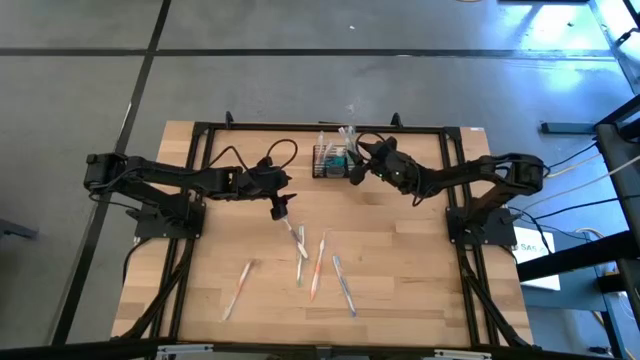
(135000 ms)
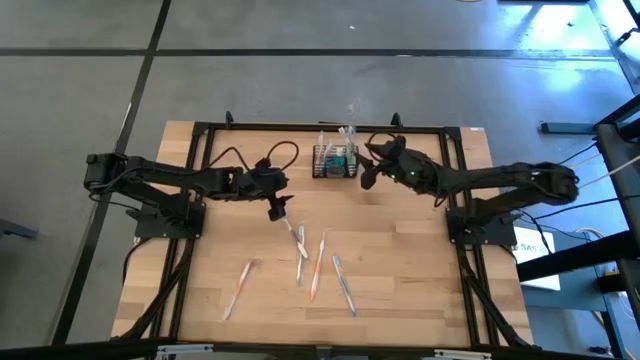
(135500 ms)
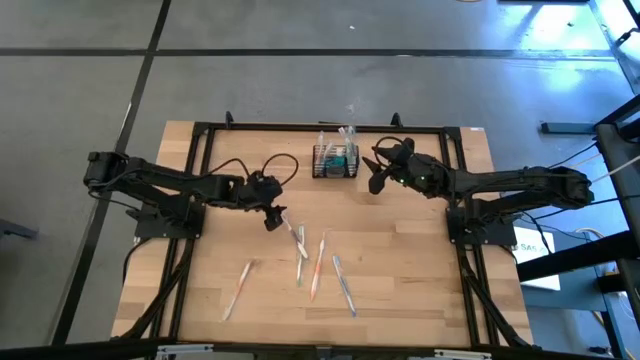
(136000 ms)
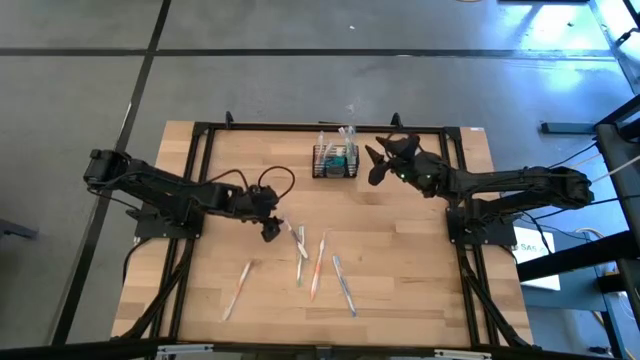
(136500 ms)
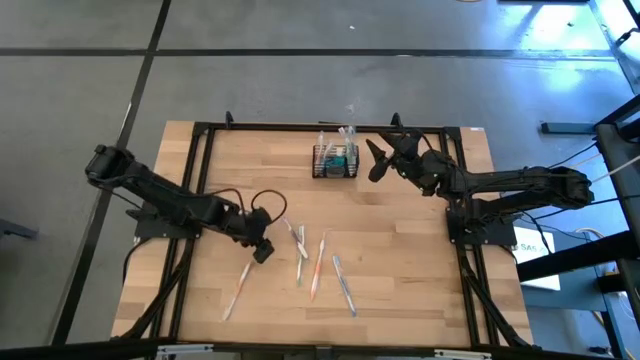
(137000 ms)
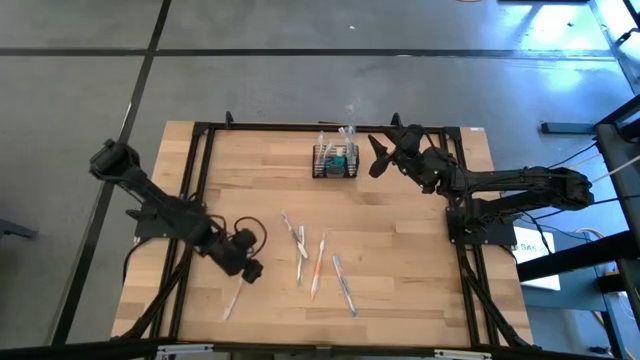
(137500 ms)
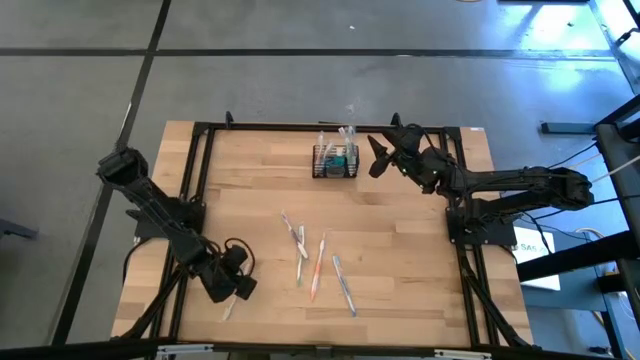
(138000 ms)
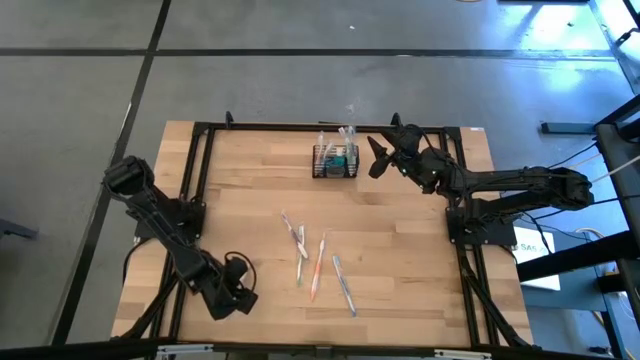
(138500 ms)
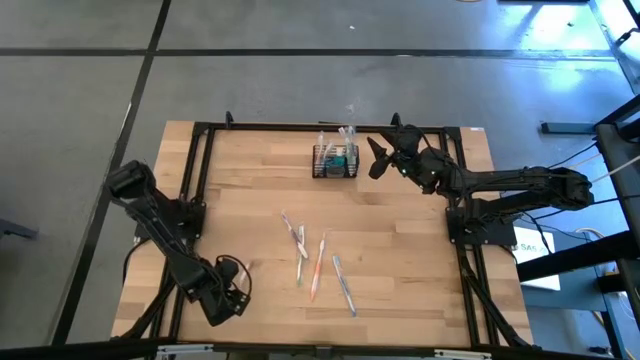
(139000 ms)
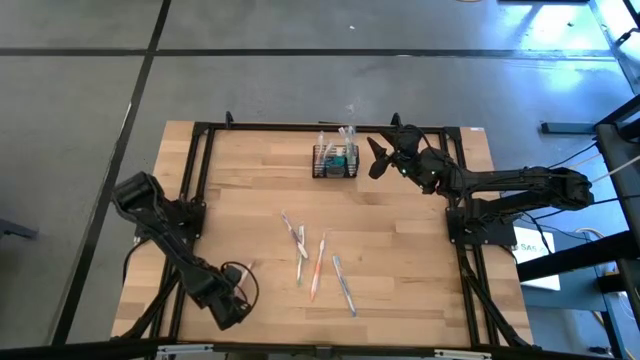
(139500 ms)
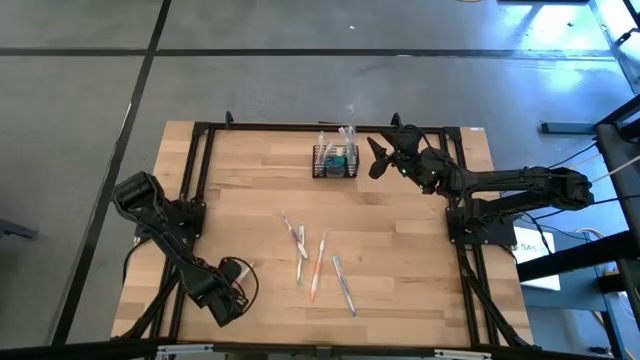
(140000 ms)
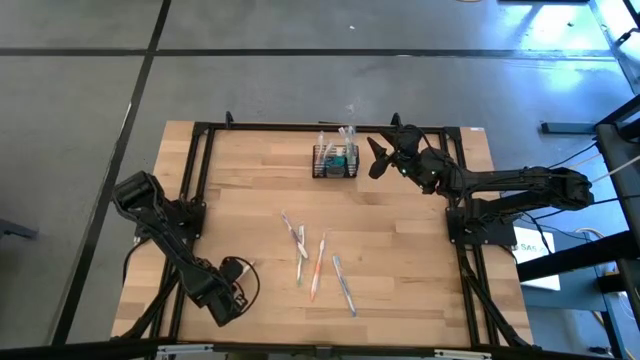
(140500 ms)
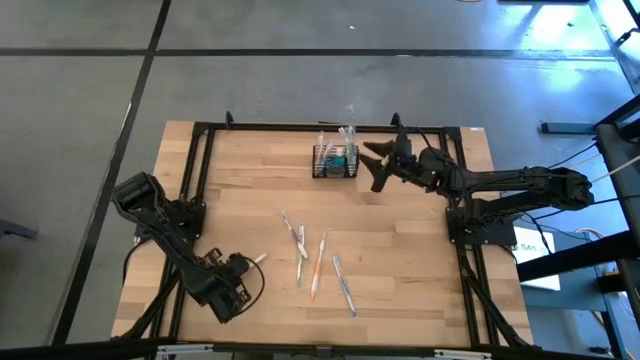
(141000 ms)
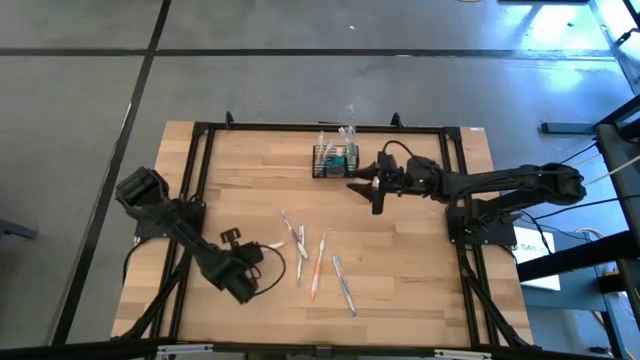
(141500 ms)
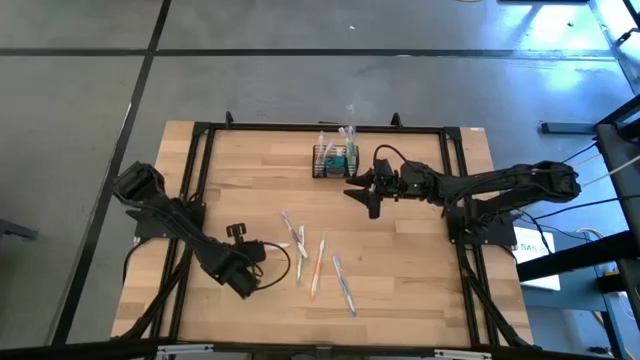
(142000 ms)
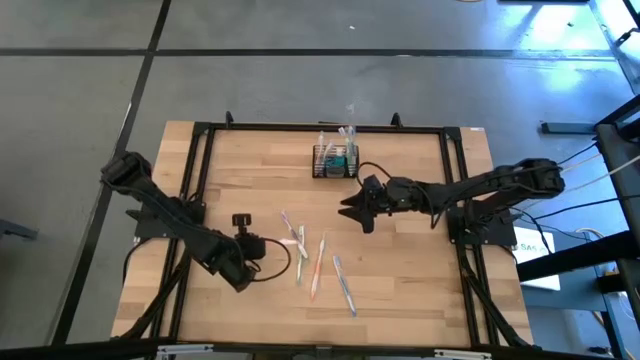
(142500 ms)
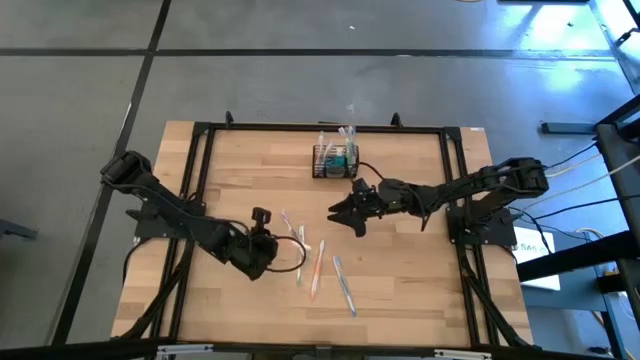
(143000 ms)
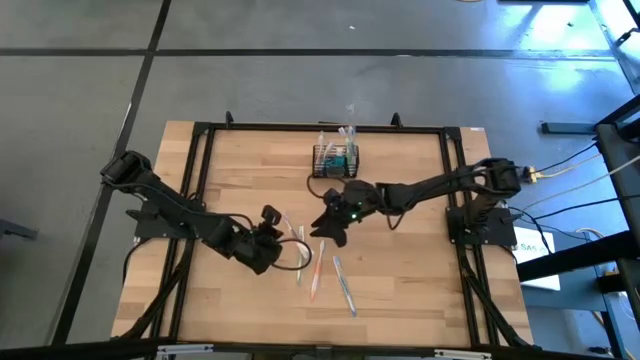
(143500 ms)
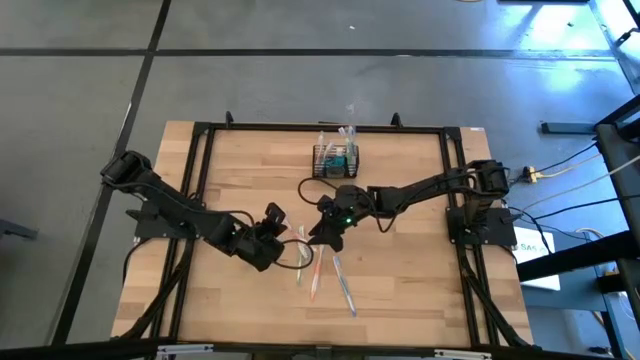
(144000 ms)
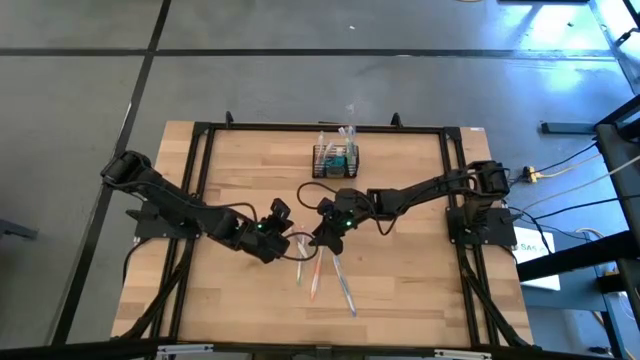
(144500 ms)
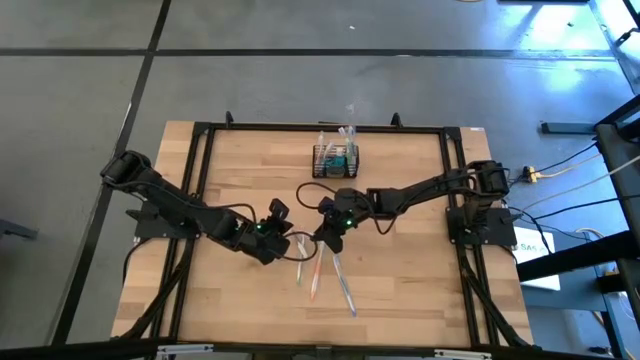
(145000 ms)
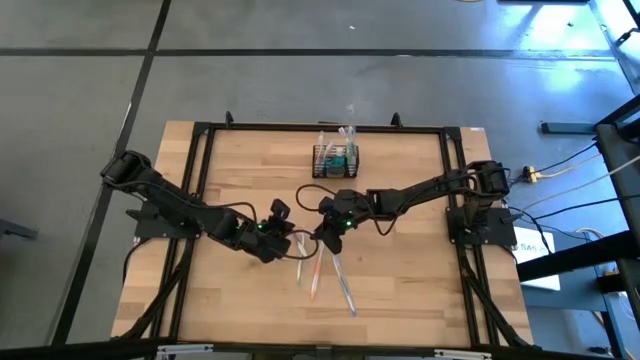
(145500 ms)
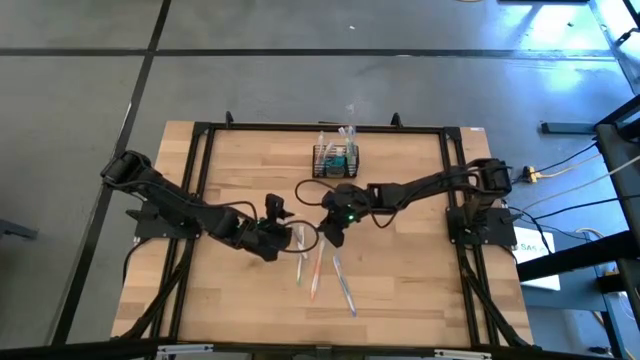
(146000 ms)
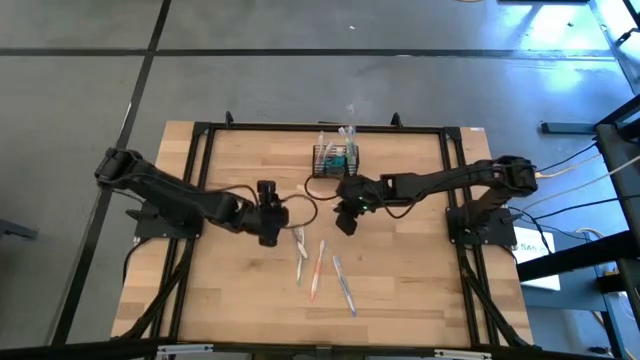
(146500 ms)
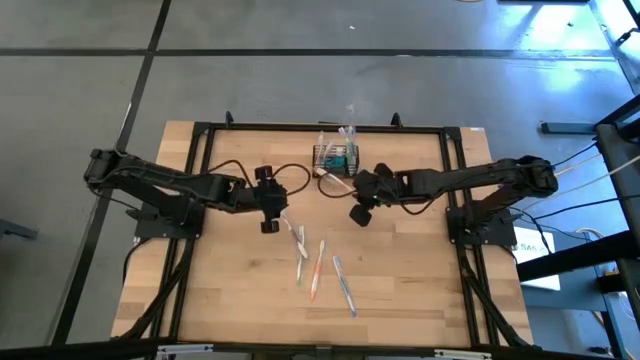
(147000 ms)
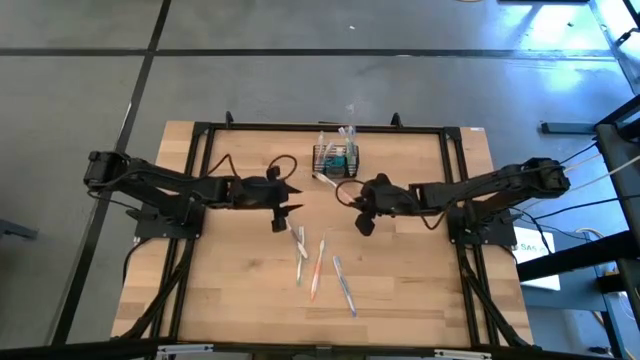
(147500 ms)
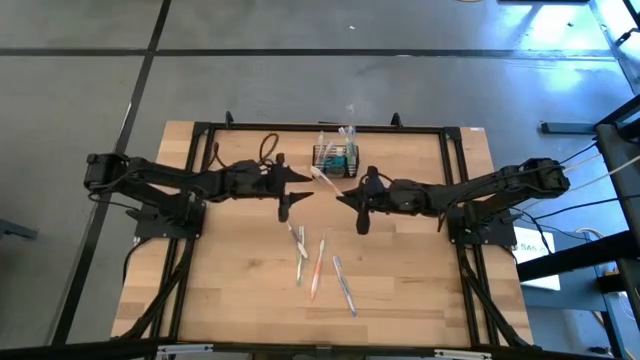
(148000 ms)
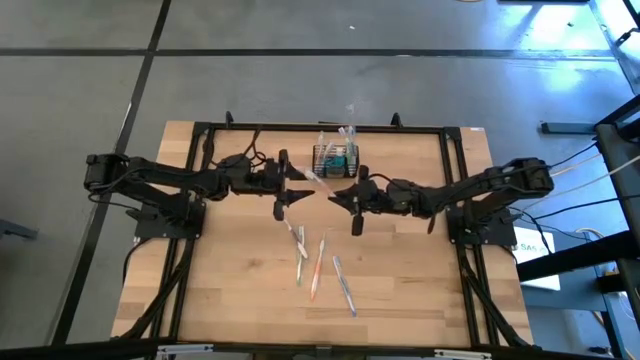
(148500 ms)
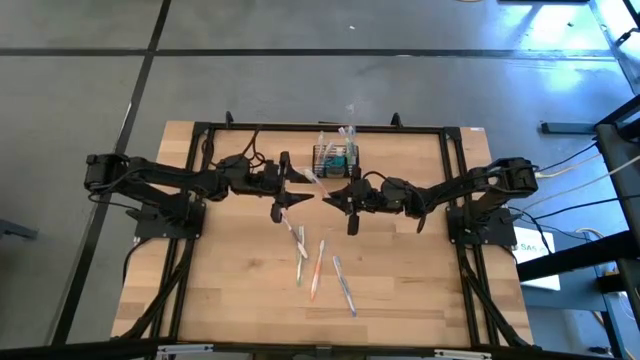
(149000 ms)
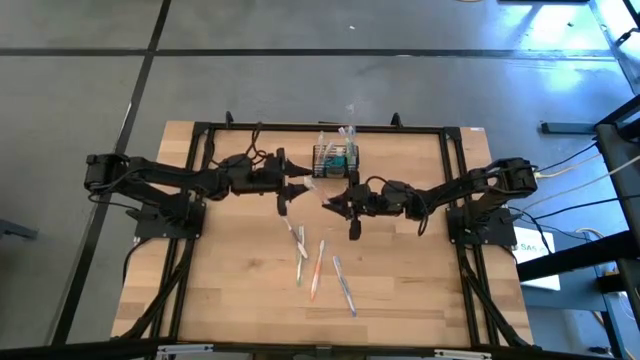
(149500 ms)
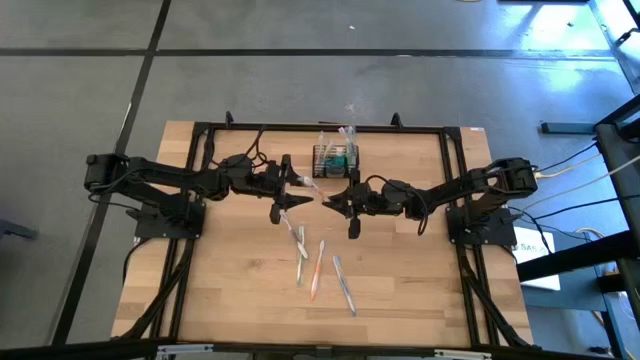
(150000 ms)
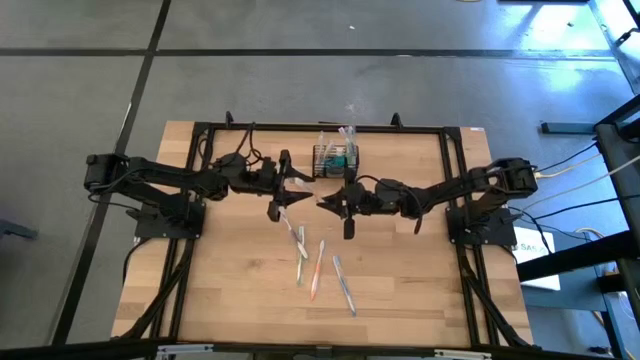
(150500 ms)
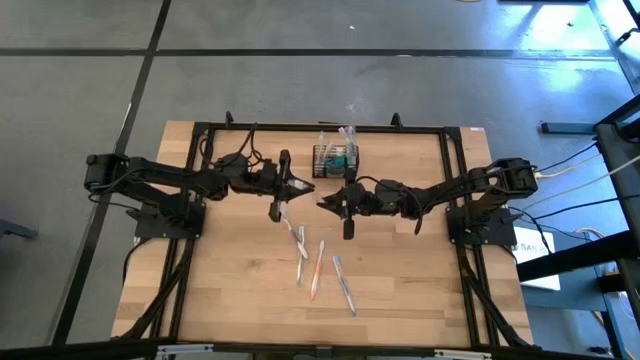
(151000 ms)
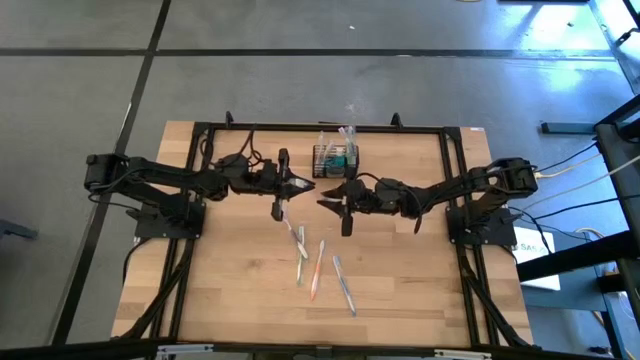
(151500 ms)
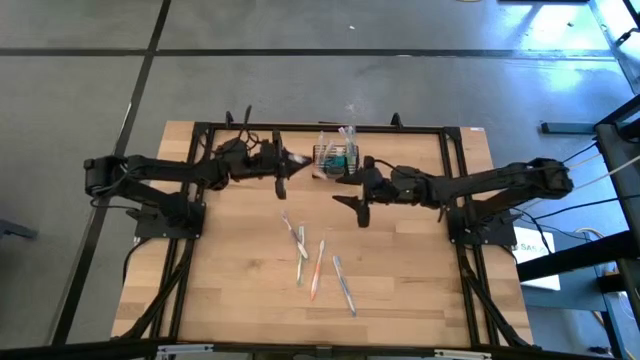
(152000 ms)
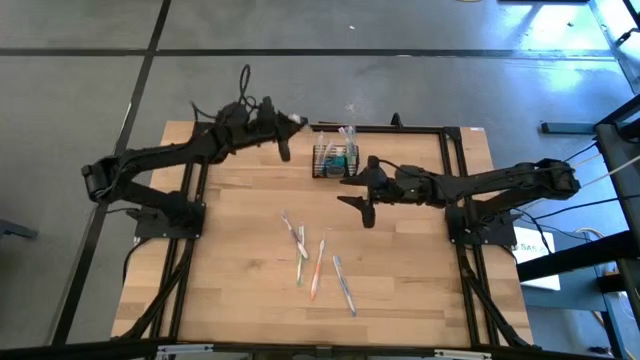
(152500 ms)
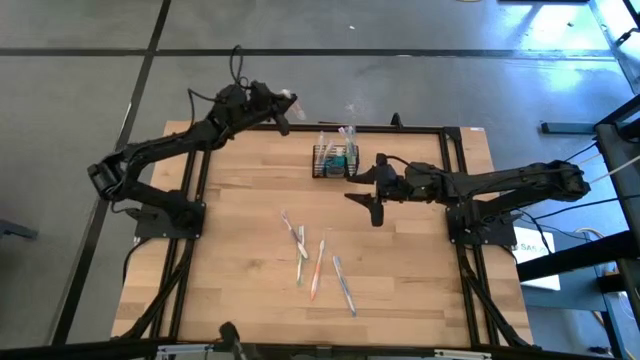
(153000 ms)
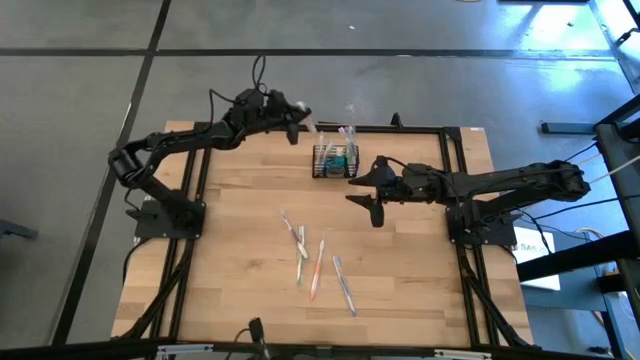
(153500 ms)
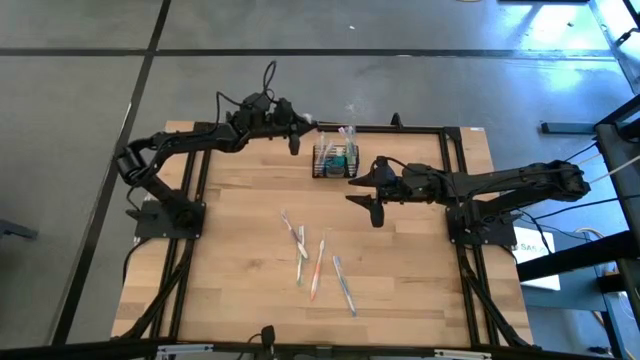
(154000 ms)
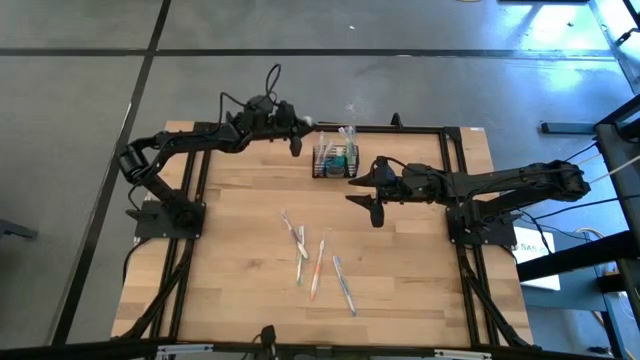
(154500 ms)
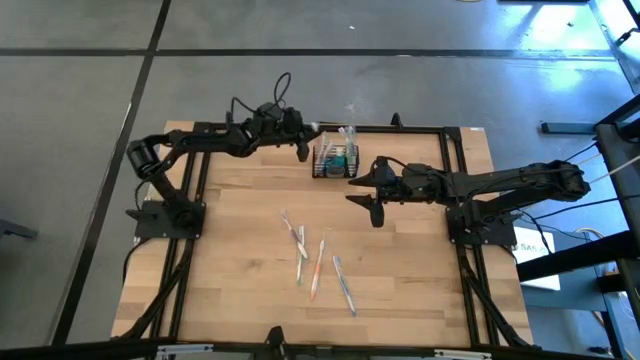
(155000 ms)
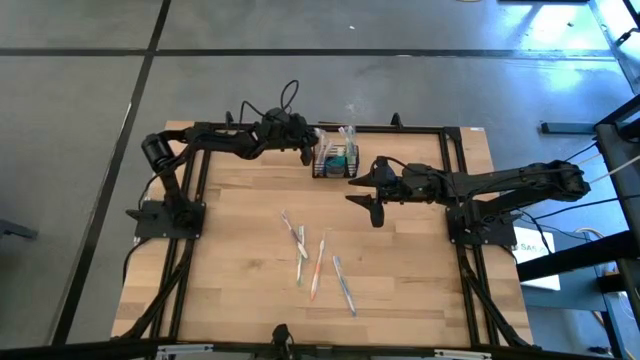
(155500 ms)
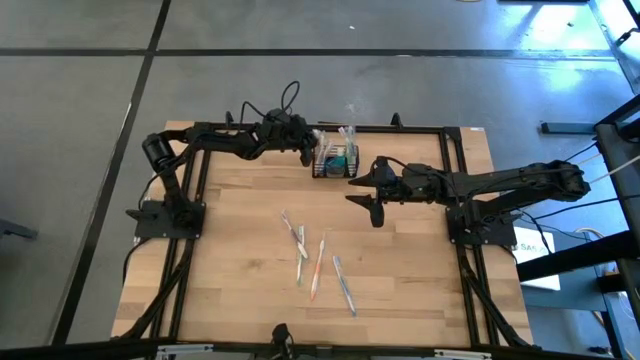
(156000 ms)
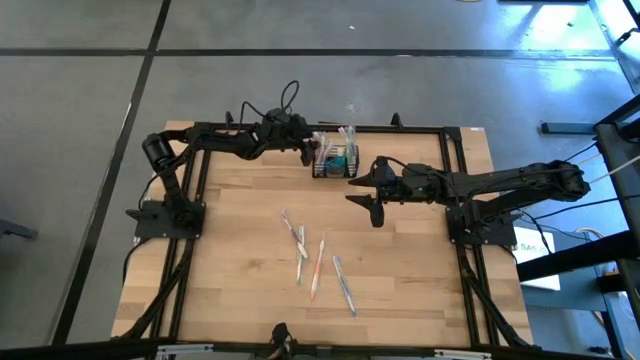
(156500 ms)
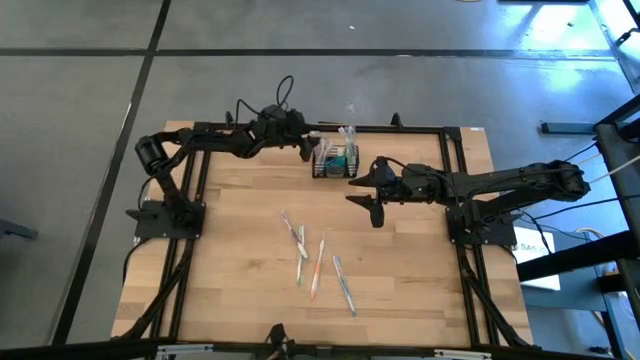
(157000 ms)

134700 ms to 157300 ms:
Task: Pick & Place toothbrushing station
Put the bottom orange toothbrush in the left section of the wire organizer
